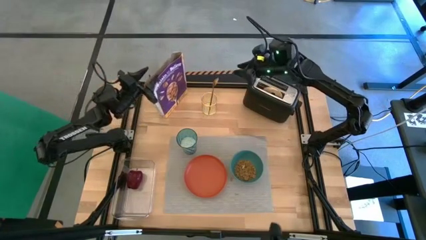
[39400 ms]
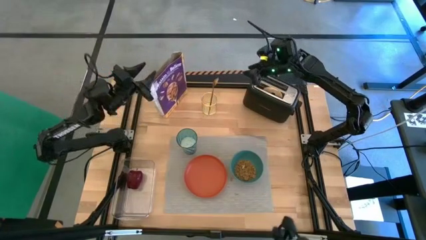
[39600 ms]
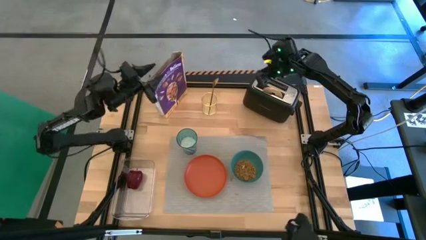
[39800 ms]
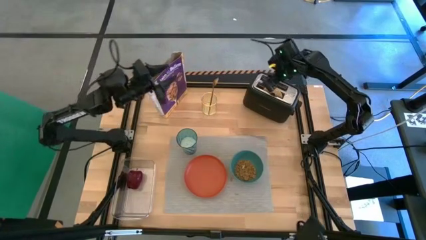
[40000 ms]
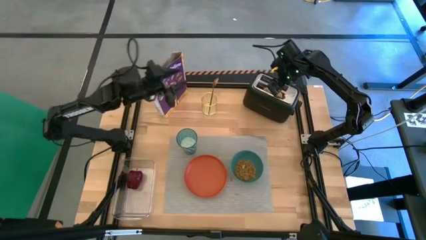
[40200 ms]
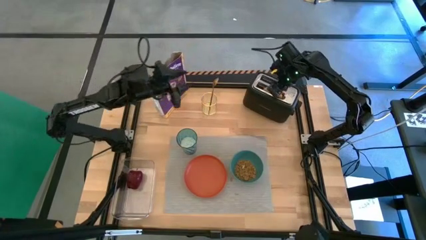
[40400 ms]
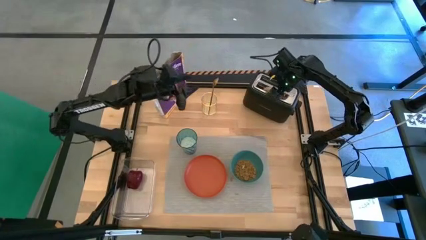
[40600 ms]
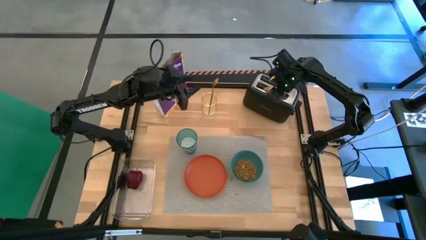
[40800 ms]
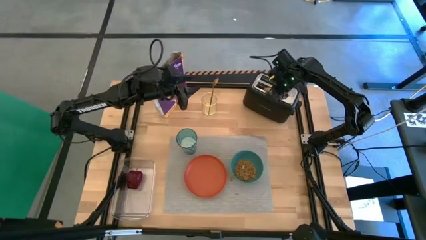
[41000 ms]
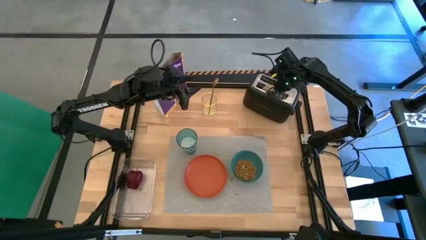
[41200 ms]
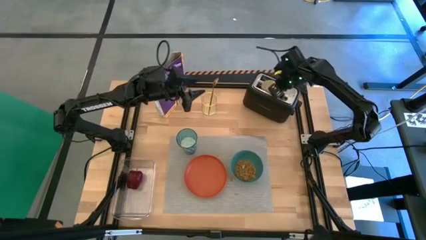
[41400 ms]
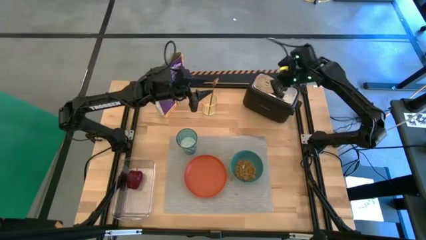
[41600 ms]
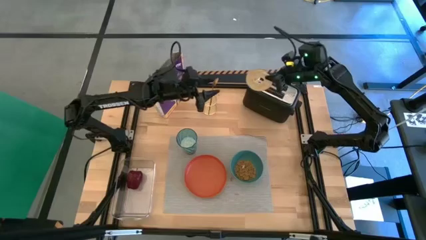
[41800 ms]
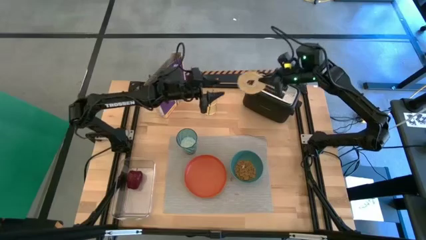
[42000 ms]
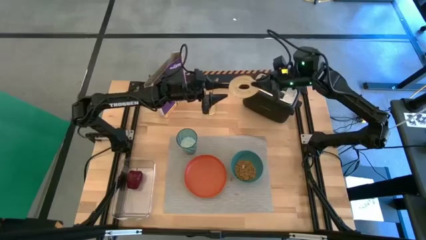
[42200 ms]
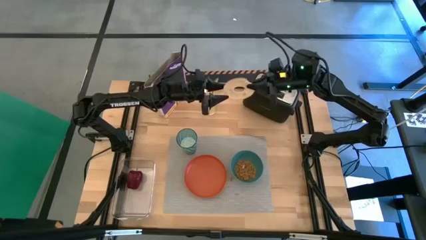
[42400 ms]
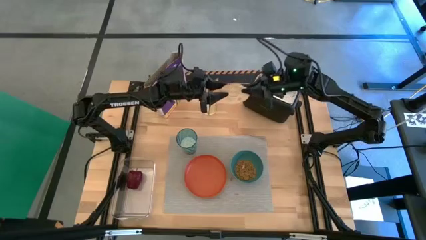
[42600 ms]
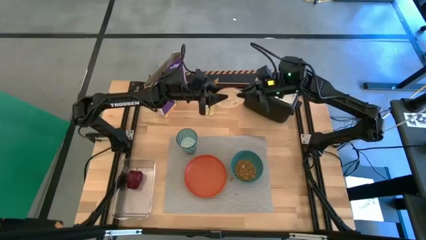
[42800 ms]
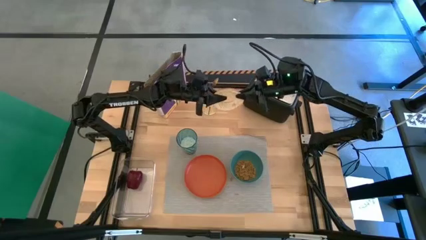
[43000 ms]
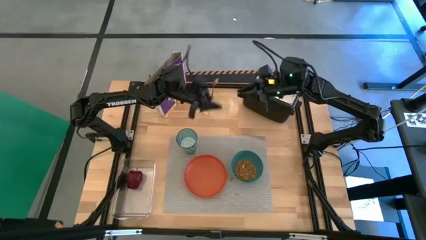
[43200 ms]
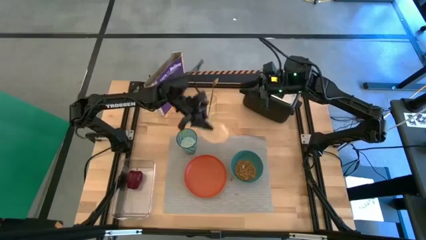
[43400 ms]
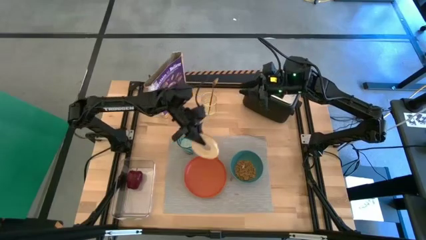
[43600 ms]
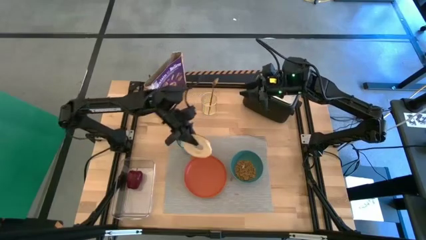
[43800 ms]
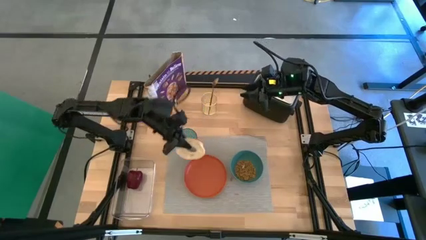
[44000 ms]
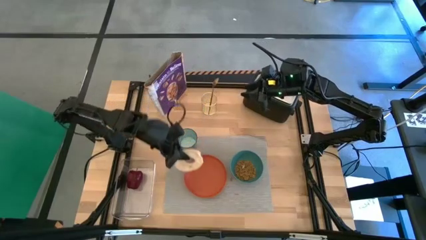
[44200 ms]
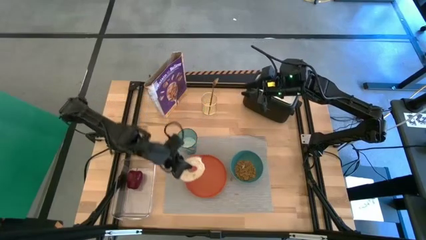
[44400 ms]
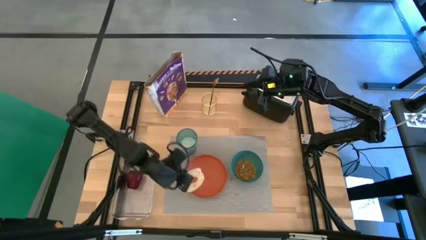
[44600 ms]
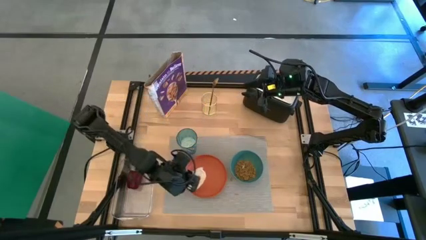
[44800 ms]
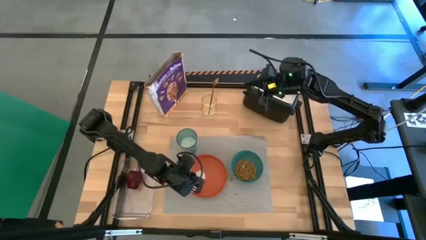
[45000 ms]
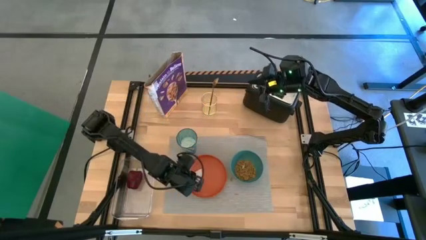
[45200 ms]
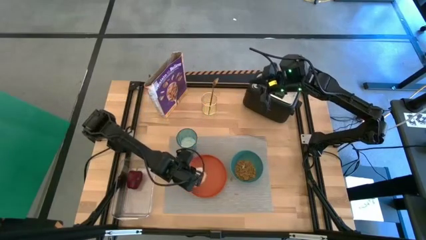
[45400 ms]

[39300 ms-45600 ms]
Task: Arrange a breakfast setting
Put the toasted bread on the orange plate

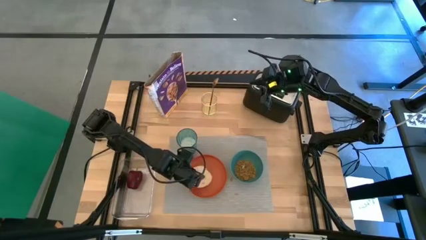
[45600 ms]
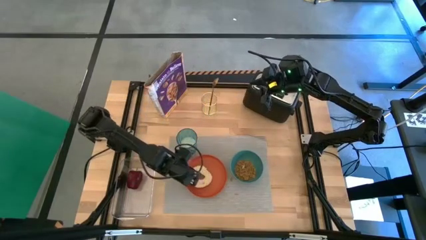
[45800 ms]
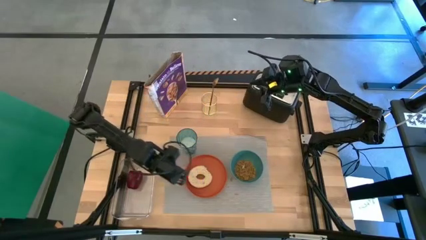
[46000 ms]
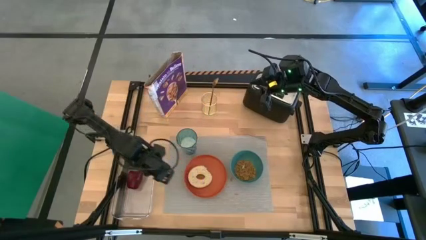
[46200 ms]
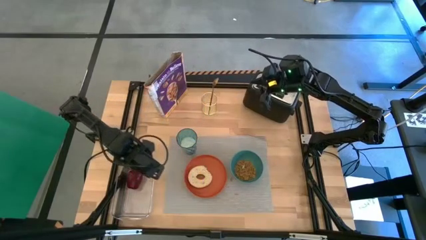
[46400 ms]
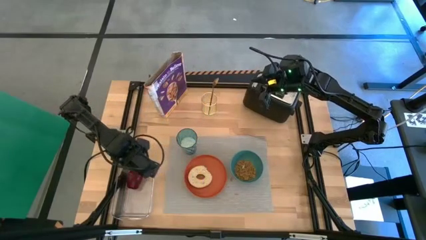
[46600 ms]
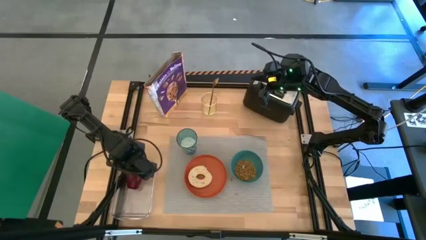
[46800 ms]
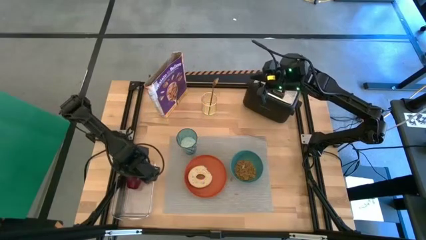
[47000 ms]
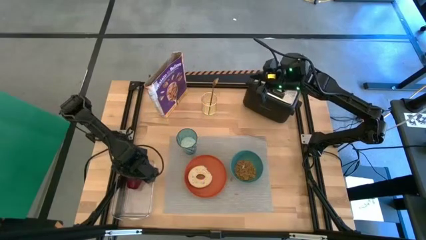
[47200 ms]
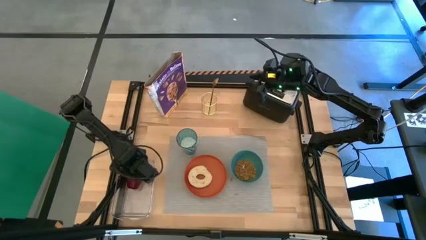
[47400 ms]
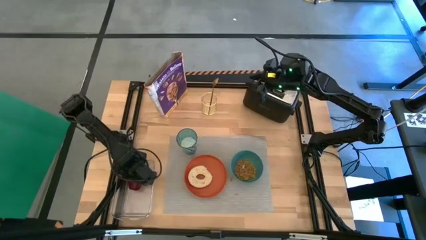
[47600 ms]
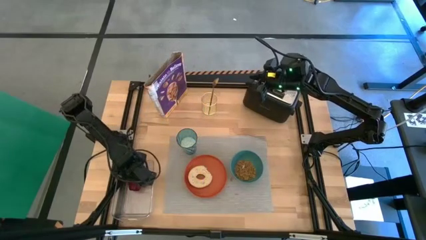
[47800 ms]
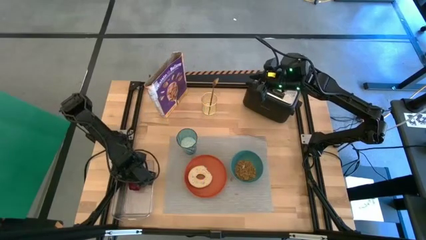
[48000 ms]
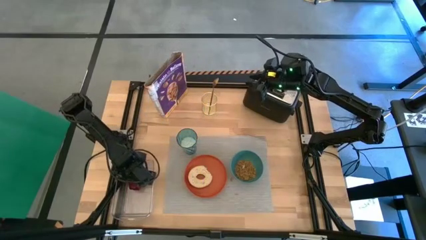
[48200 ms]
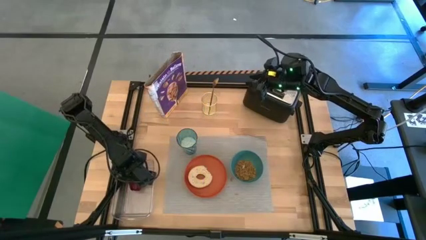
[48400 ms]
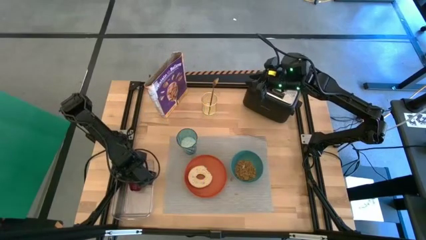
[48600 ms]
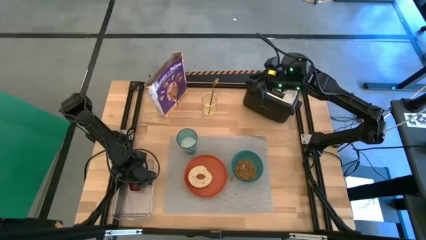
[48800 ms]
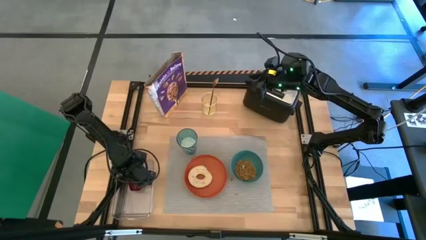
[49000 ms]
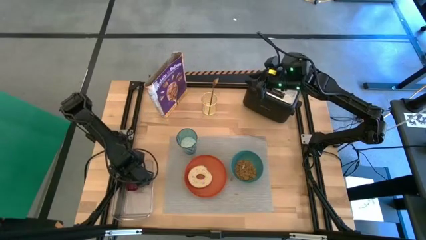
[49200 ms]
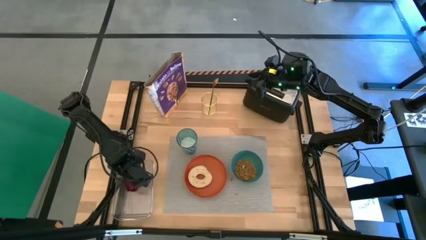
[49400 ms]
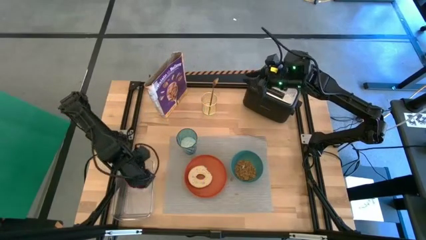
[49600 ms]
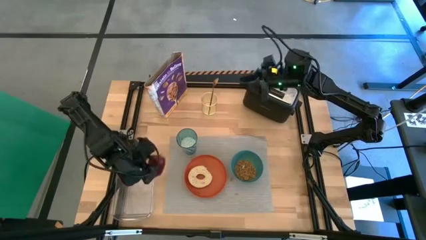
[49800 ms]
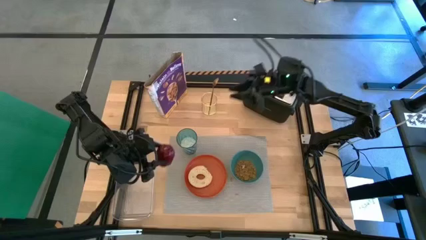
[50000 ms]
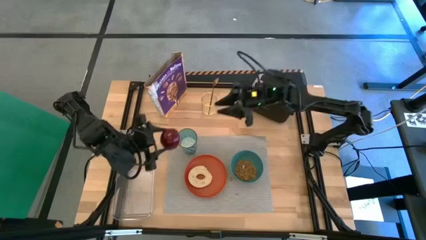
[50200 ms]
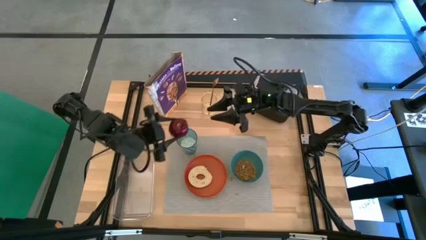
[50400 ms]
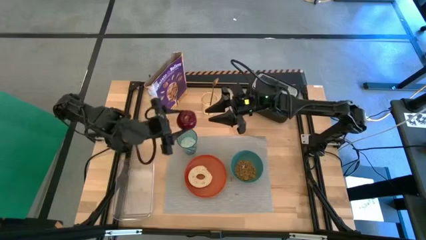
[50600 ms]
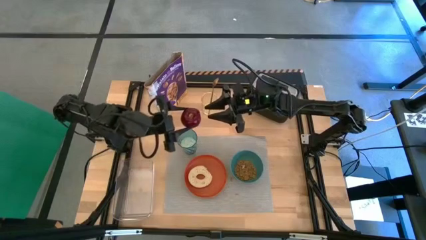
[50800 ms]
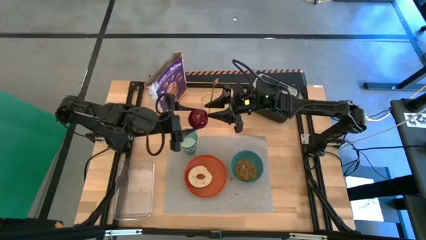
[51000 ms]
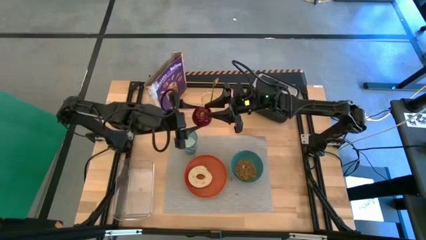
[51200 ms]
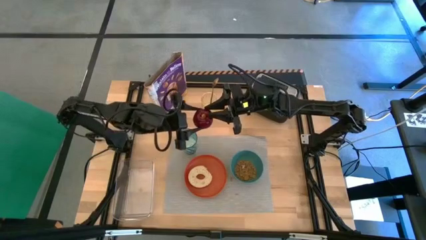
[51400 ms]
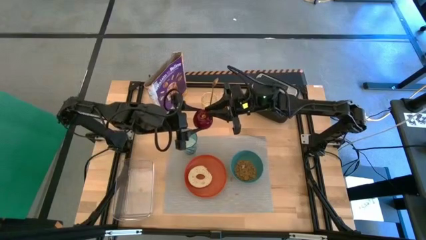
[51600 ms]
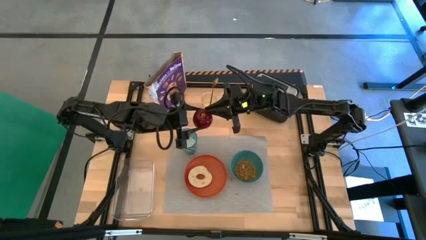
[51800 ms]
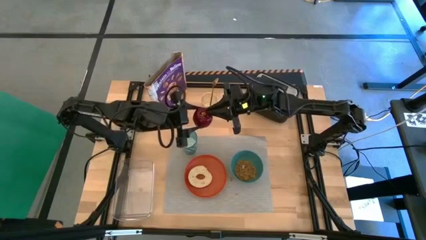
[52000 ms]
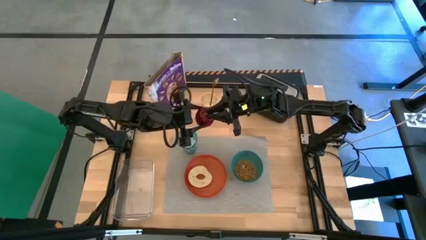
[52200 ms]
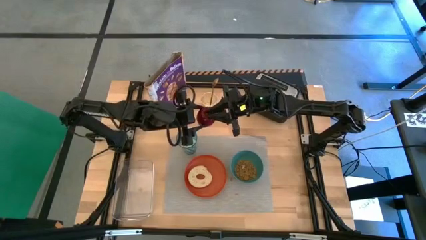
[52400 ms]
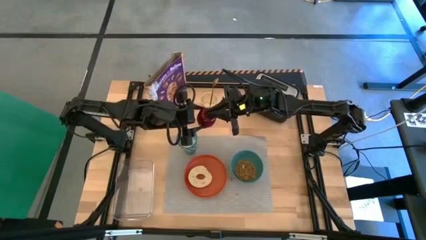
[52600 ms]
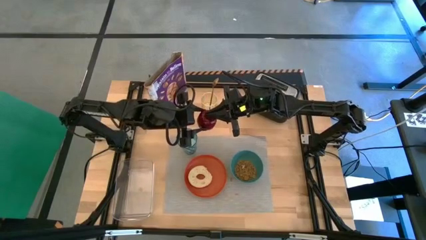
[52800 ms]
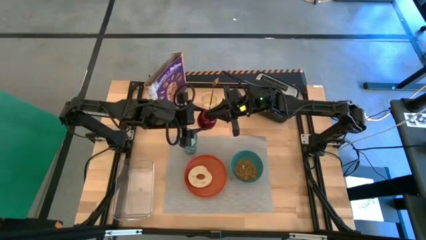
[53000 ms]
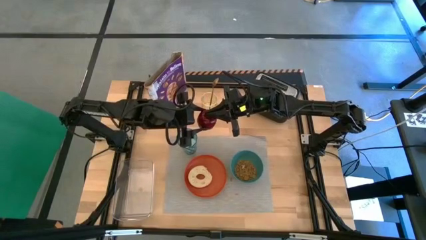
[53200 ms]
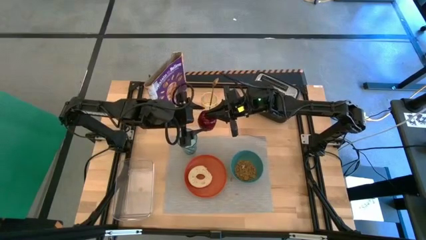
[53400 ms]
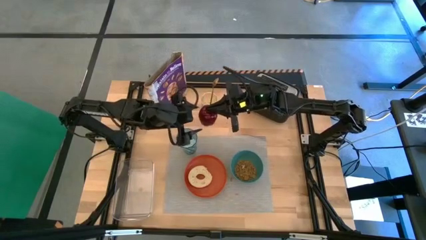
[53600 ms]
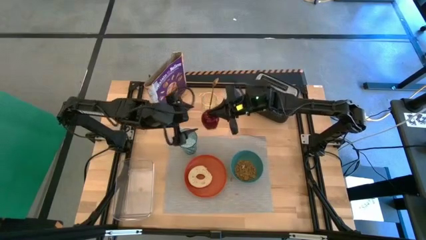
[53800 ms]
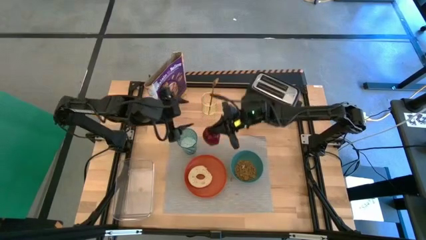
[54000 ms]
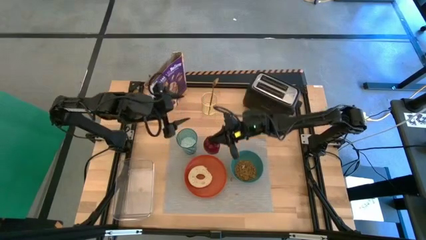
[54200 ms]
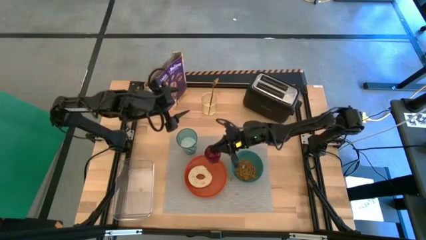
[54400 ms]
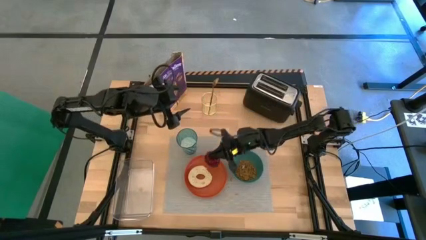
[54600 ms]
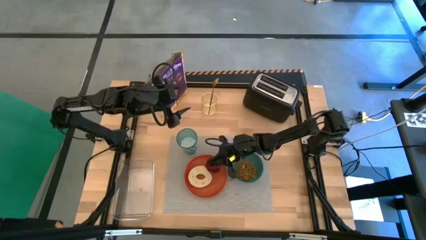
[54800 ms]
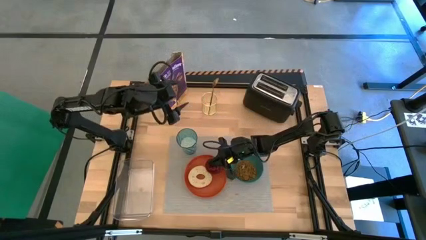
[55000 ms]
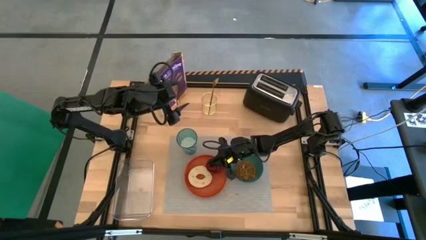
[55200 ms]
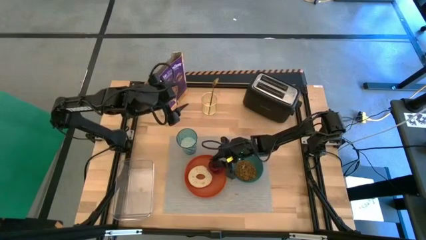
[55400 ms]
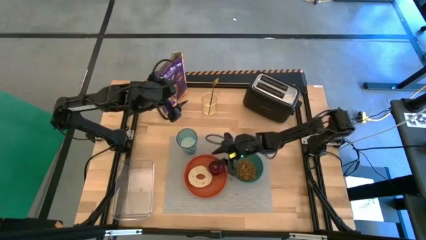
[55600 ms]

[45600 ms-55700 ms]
Put the red apple on the orange plate
